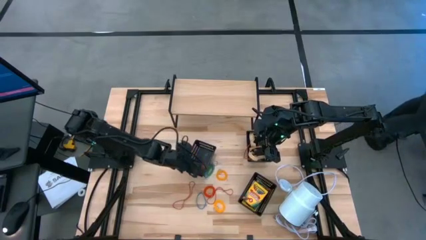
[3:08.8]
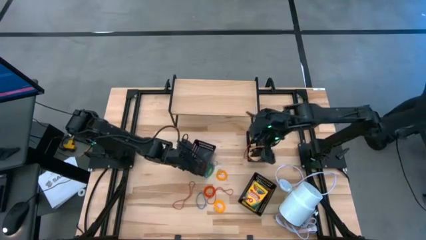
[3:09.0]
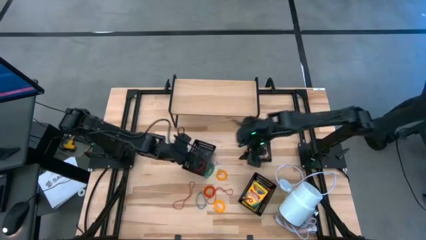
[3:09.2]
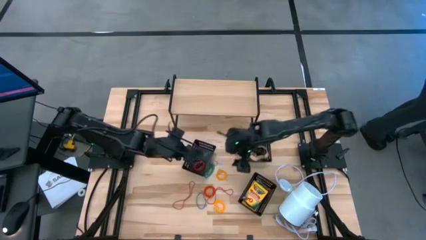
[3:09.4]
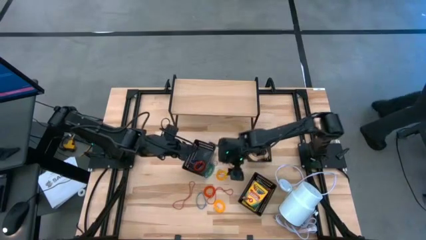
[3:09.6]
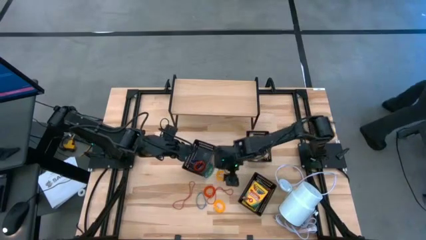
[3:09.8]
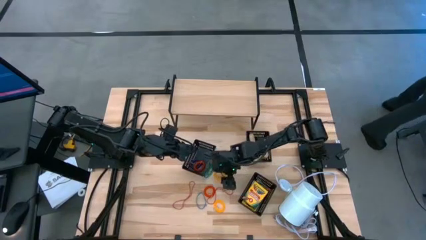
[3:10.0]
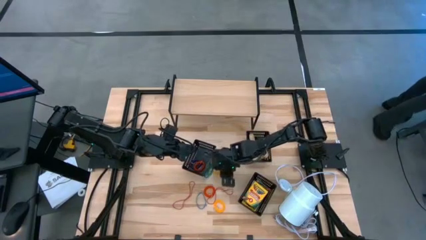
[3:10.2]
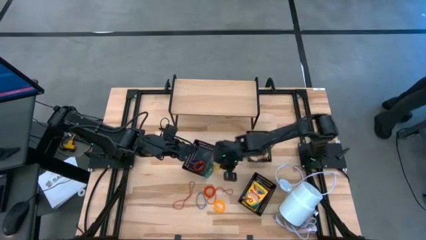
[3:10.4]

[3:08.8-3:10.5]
Task: Pick & Place Office Desk Supplies
Put the top yellow spring keychain into the left black bin

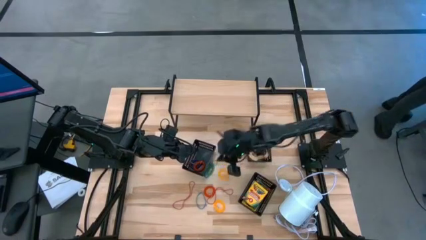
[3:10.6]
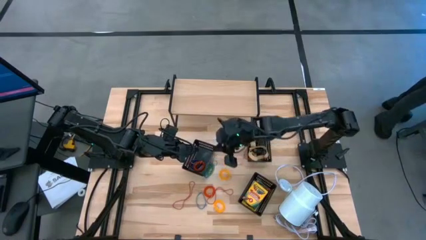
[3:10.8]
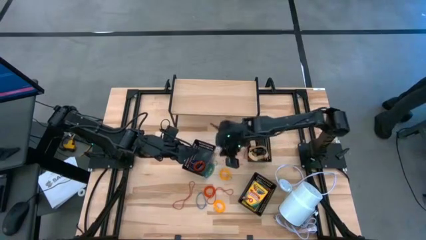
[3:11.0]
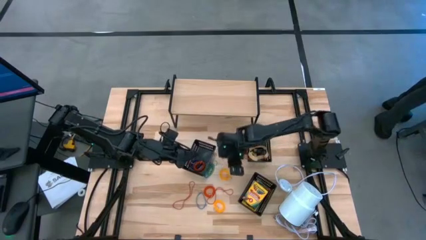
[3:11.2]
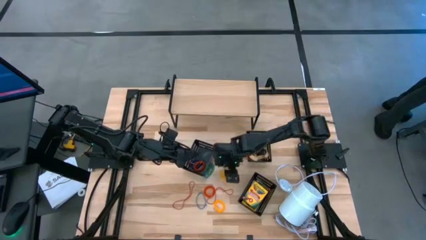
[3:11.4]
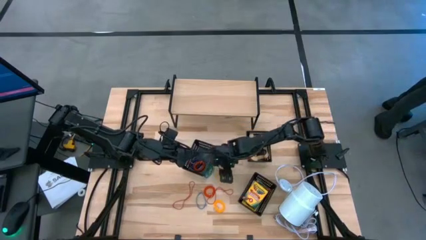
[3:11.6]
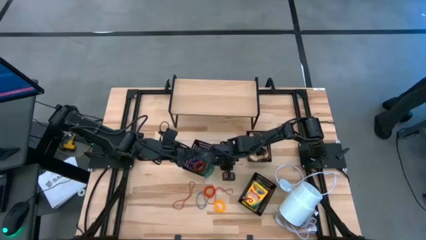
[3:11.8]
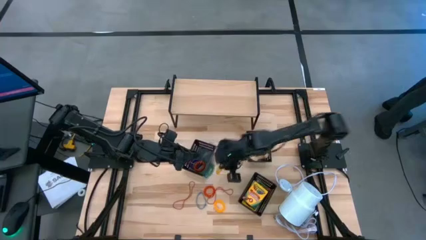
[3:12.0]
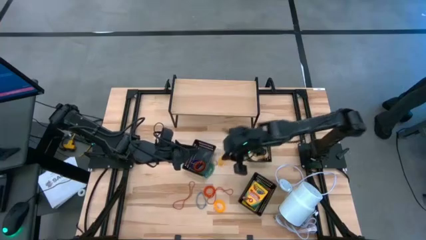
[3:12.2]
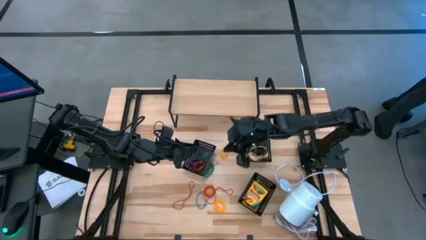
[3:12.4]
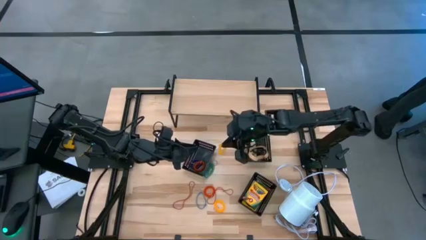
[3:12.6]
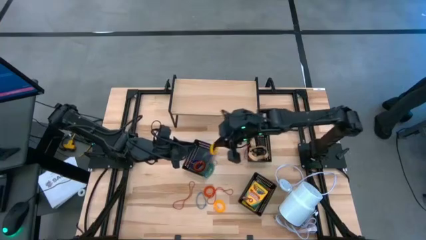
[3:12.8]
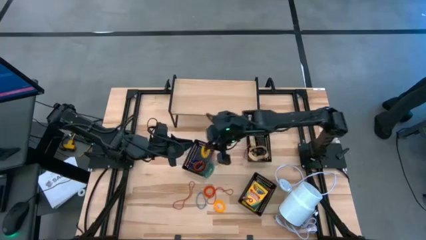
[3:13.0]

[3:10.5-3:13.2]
Put the top orange spring keychain into the left black bin

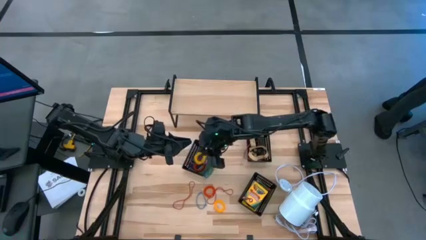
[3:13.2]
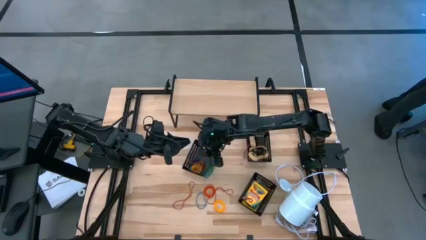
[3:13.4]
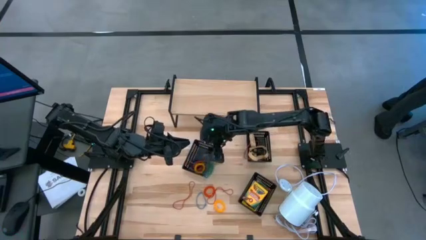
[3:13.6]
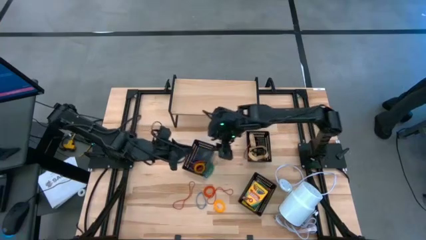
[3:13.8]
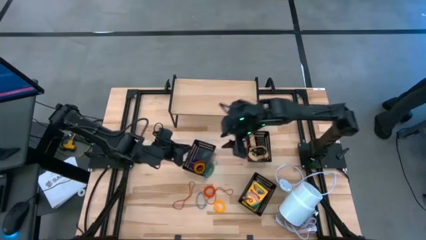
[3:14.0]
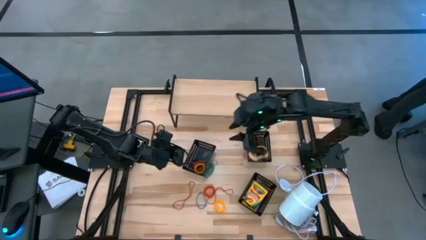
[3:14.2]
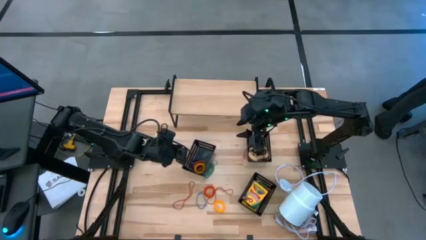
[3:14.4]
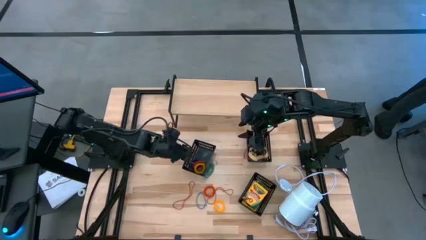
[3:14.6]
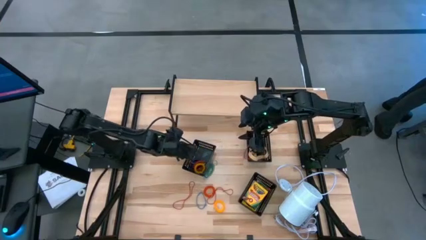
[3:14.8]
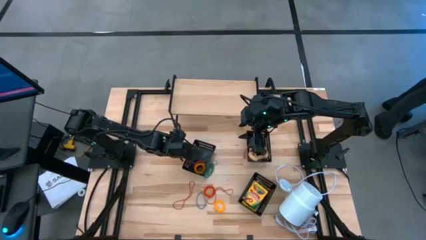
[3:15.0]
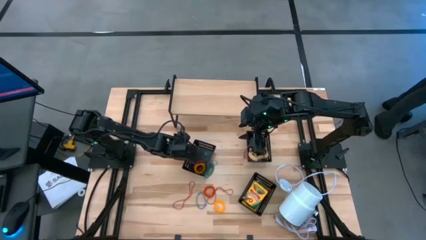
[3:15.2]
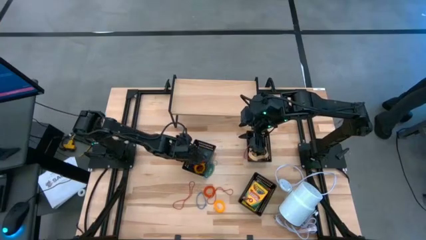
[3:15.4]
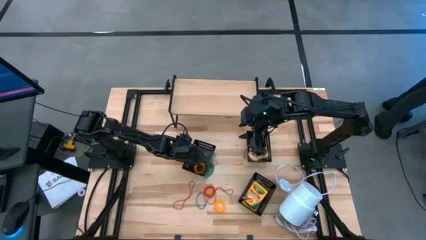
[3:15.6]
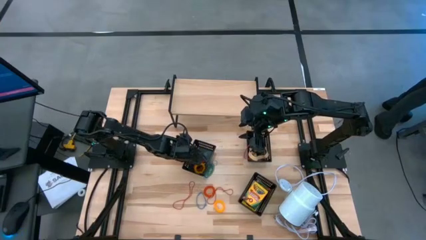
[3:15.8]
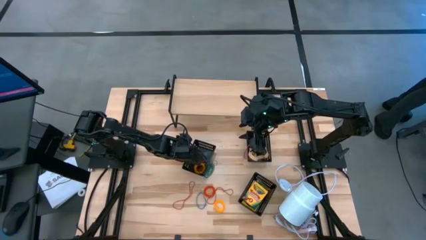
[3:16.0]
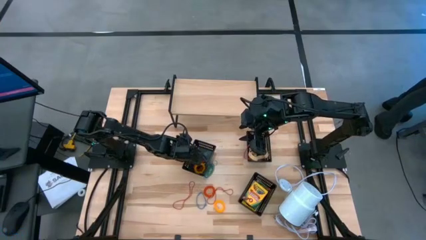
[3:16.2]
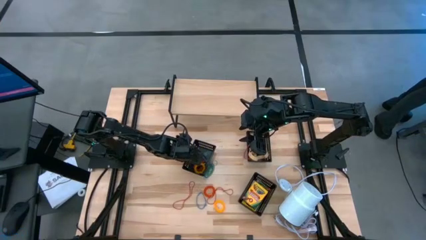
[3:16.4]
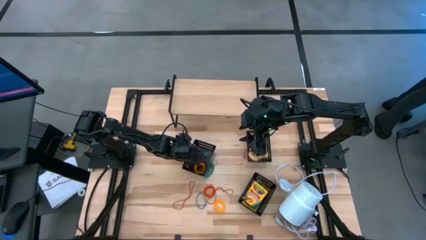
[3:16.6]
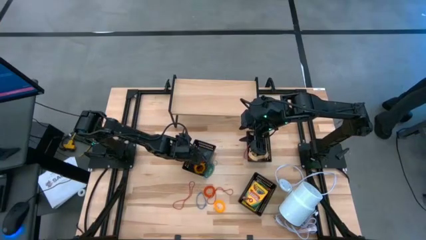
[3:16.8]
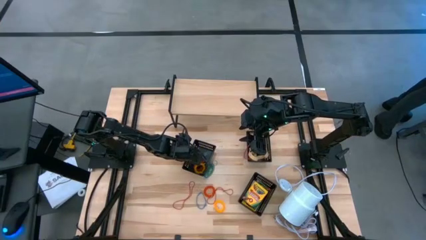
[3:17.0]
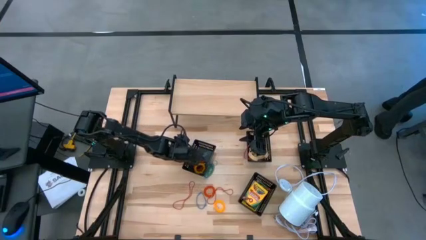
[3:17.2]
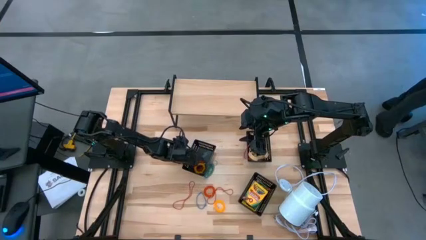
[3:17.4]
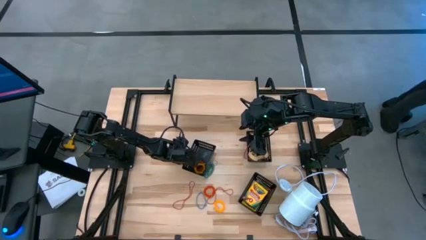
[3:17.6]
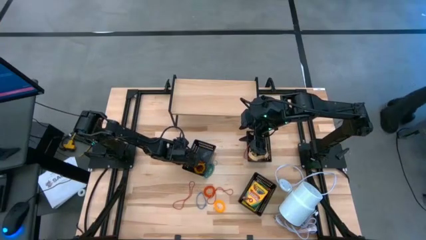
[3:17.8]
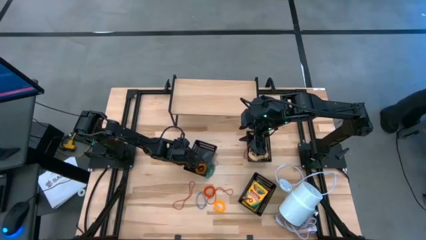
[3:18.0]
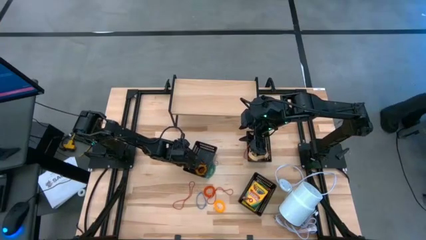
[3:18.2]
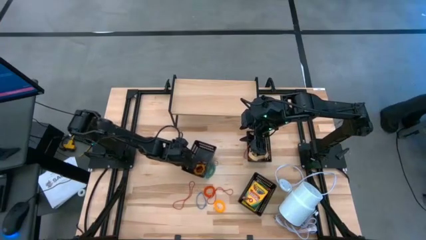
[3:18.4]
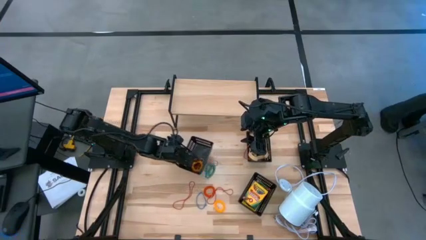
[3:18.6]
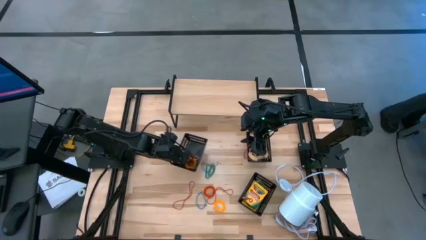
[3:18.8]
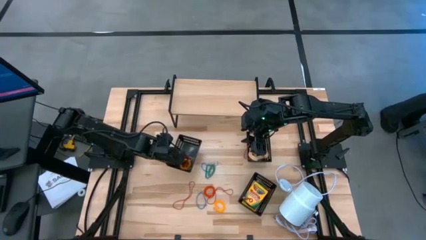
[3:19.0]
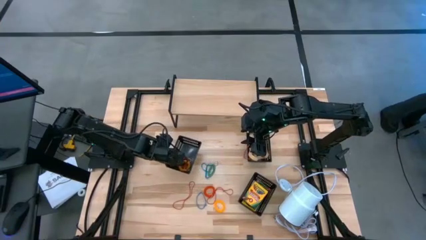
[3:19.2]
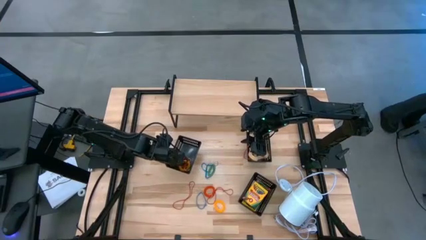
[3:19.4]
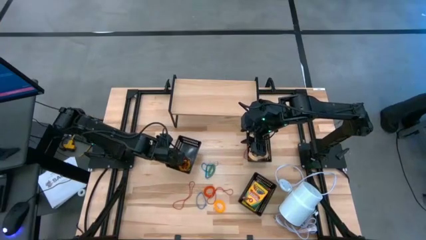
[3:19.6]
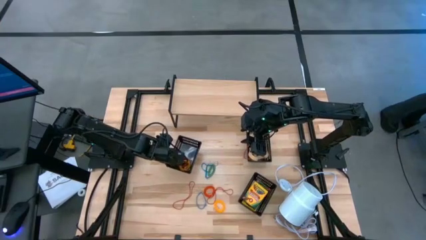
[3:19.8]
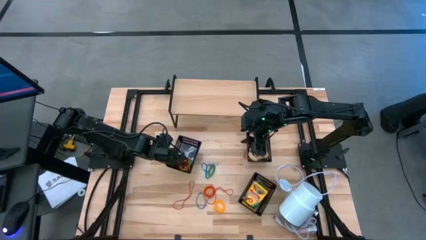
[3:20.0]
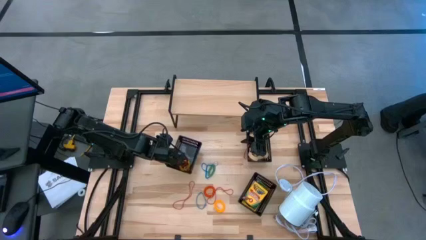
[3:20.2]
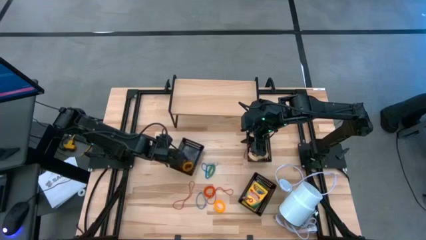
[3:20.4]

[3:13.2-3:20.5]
Move the left black bin

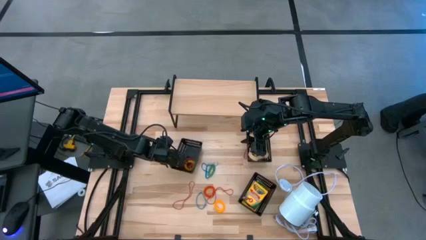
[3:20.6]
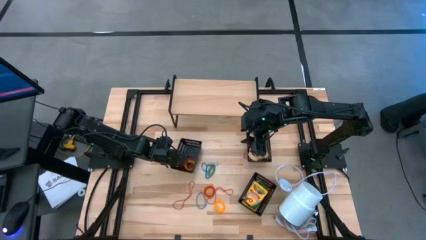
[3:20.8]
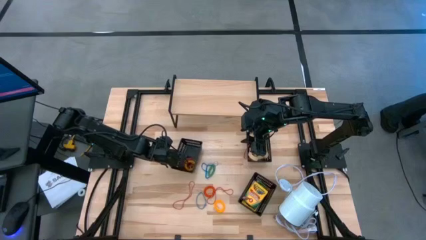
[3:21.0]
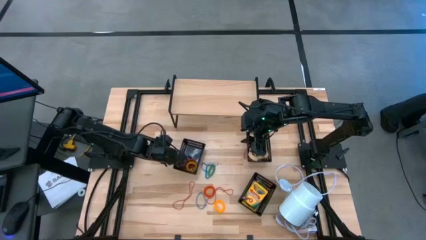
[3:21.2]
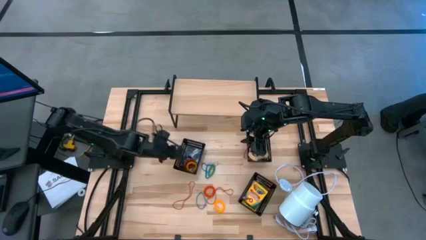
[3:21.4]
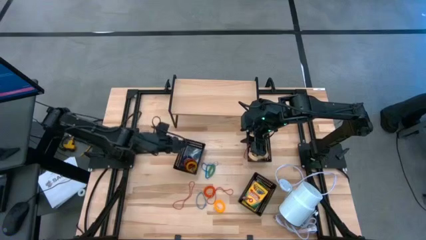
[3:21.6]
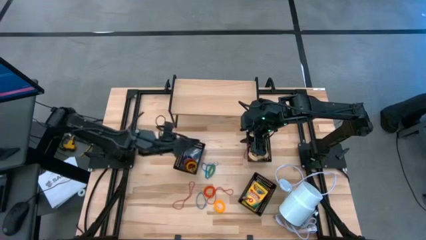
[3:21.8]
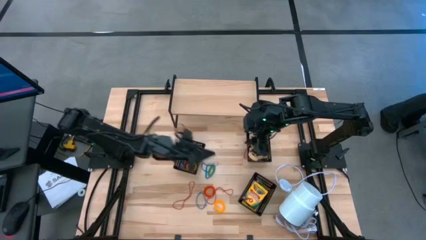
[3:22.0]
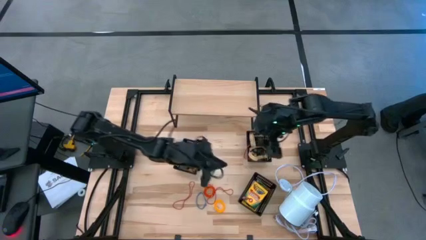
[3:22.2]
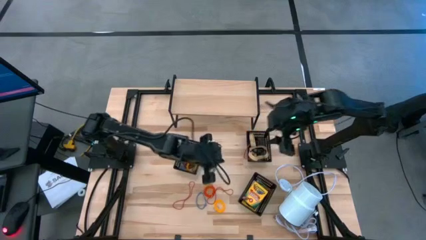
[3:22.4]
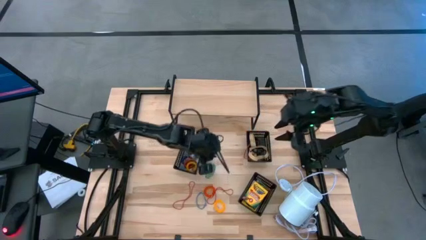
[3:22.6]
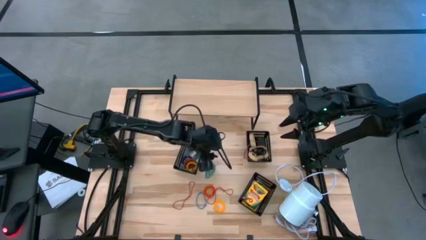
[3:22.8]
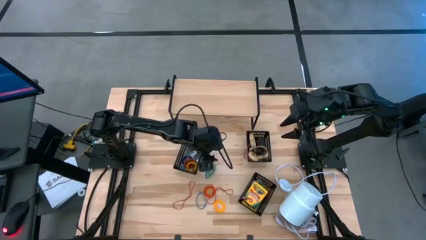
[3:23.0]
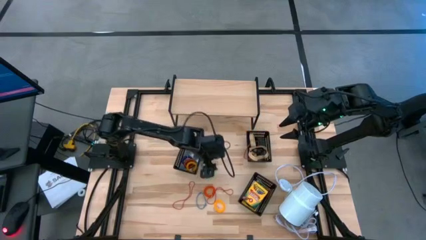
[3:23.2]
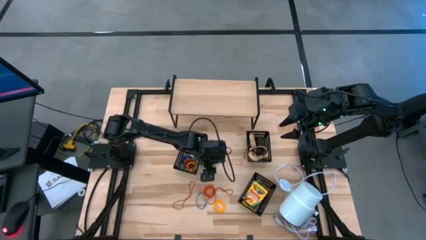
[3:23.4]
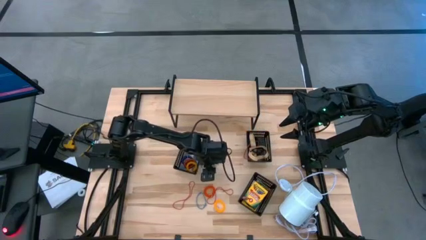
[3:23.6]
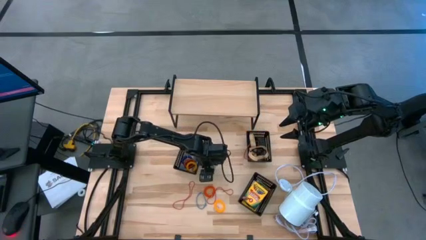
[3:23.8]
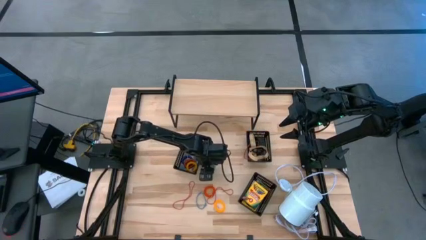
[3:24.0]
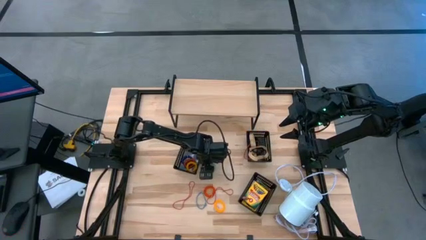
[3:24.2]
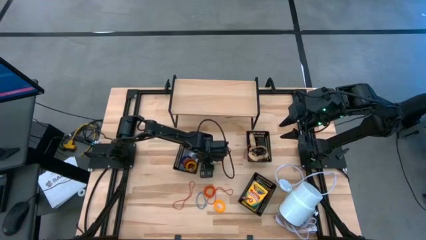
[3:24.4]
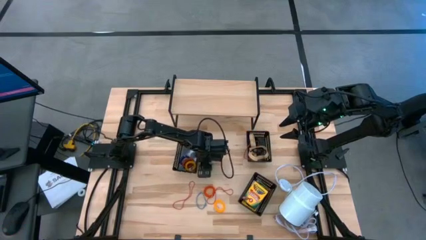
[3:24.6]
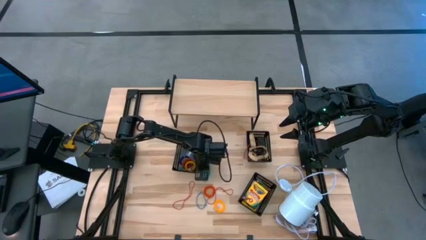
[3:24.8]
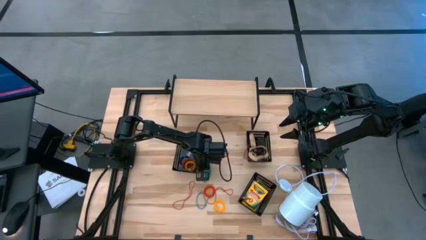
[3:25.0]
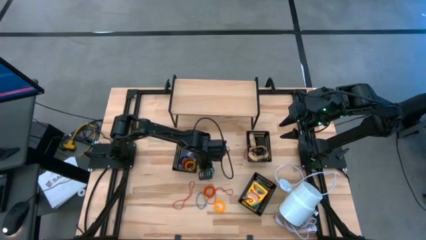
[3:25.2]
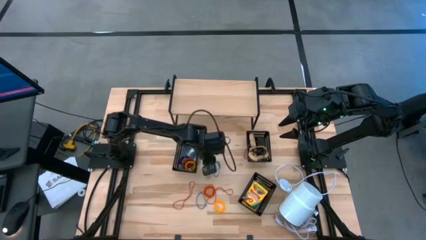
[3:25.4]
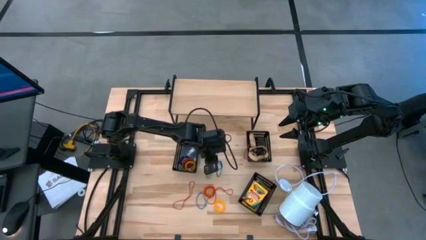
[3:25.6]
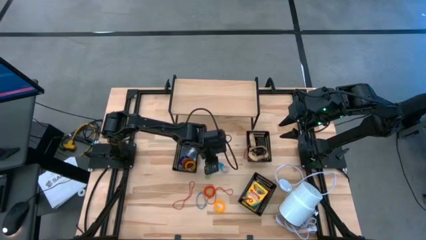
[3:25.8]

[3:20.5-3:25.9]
Put the top blue rubber band into the top right black bin

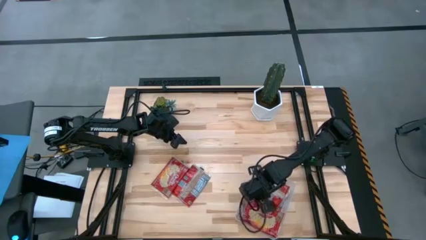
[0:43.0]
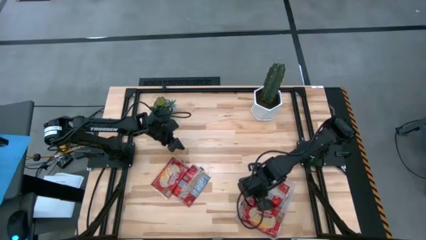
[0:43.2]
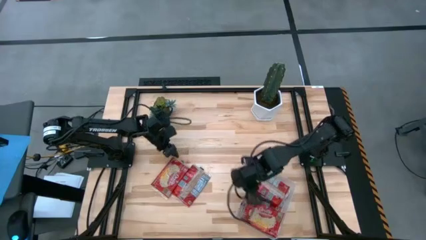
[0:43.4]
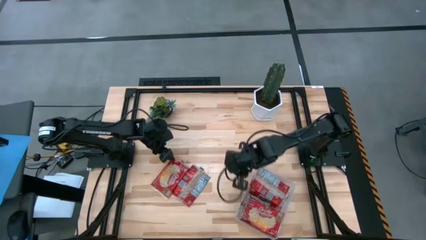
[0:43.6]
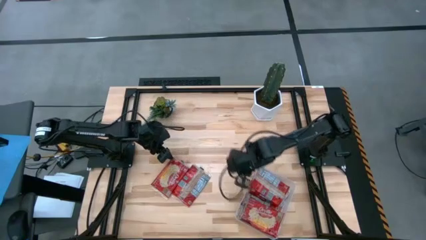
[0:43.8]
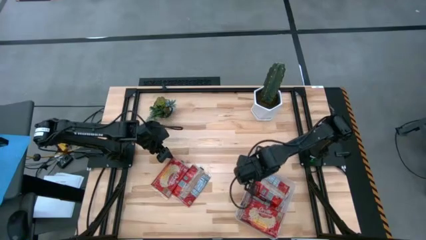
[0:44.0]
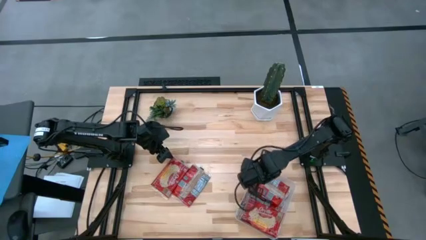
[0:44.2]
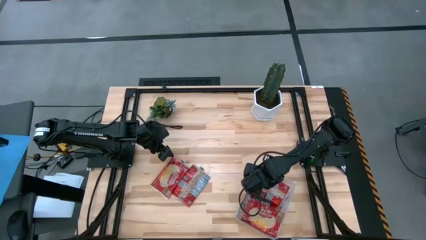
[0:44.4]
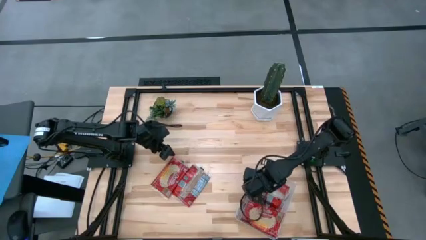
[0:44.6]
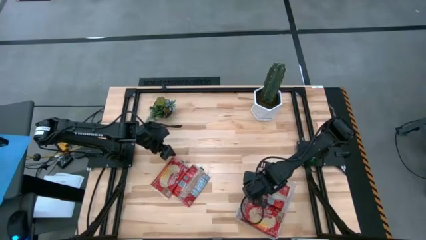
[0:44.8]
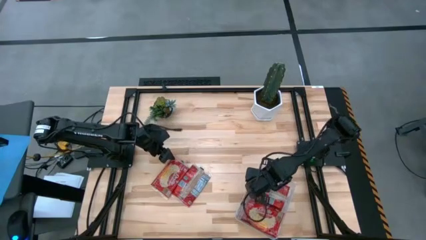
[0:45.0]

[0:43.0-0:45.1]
Task: Sort popcorn bags into baskets
Put the red popcorn bag into the transparent bin
